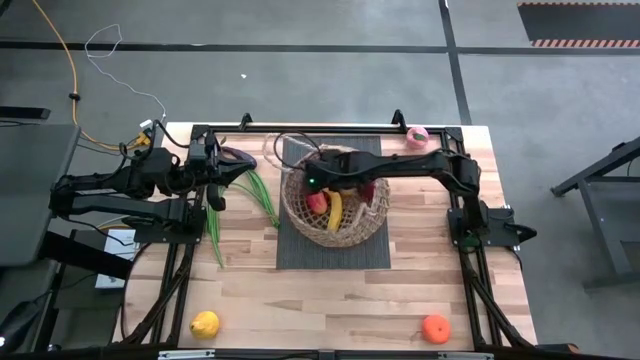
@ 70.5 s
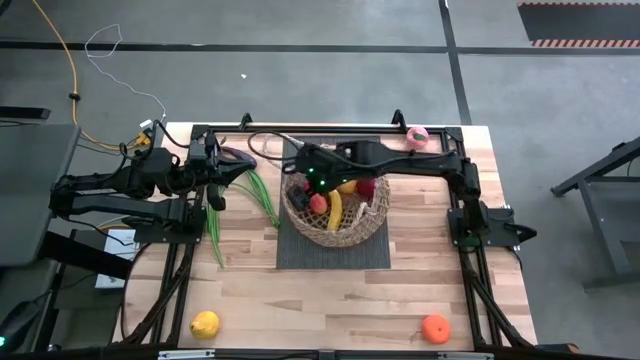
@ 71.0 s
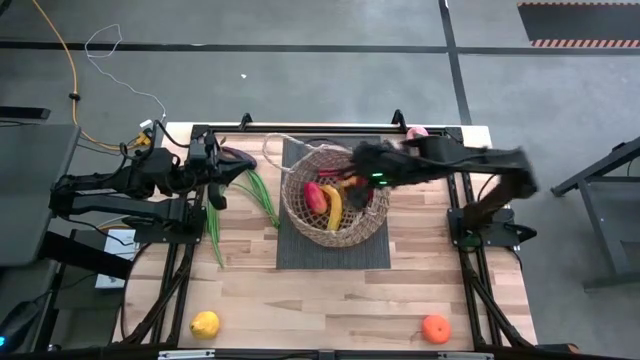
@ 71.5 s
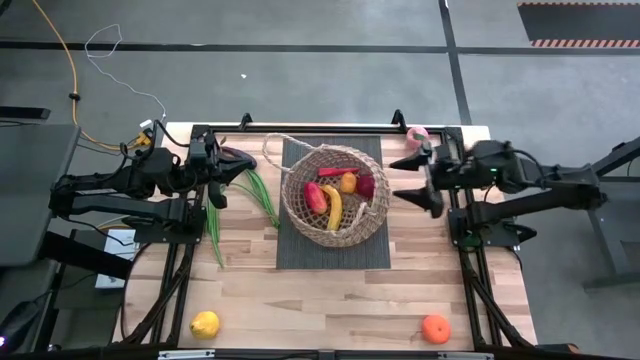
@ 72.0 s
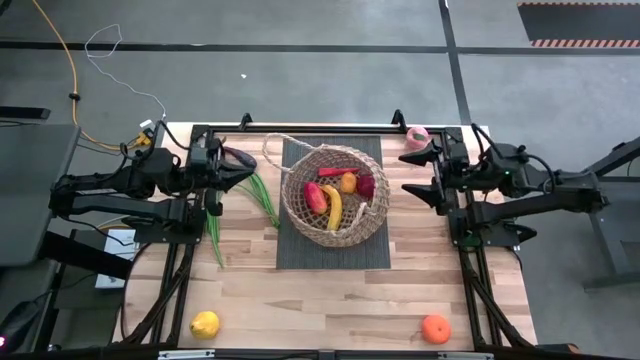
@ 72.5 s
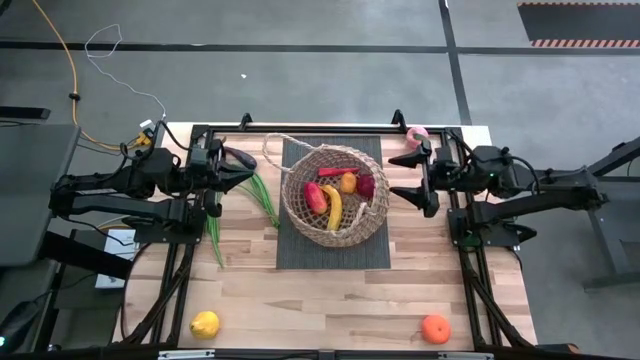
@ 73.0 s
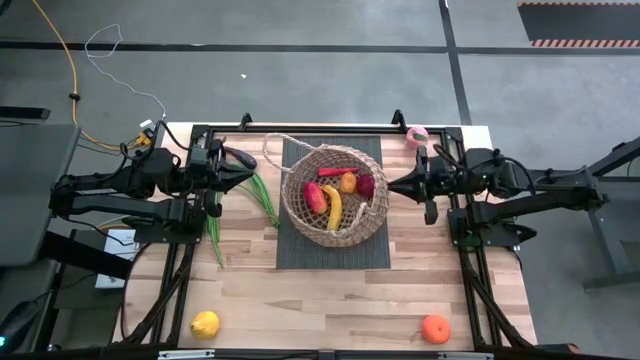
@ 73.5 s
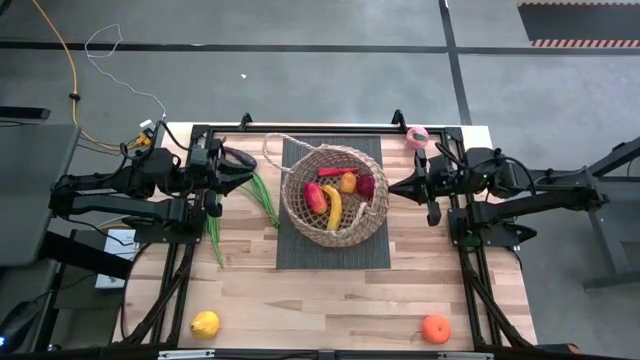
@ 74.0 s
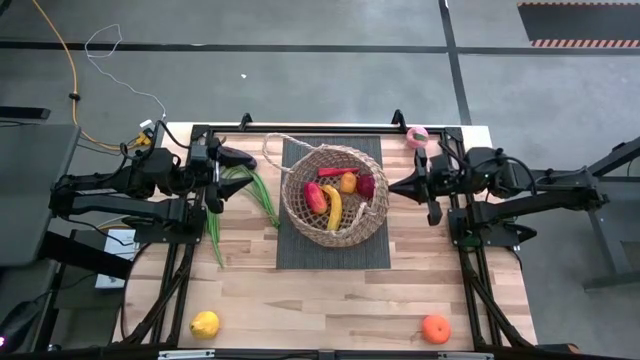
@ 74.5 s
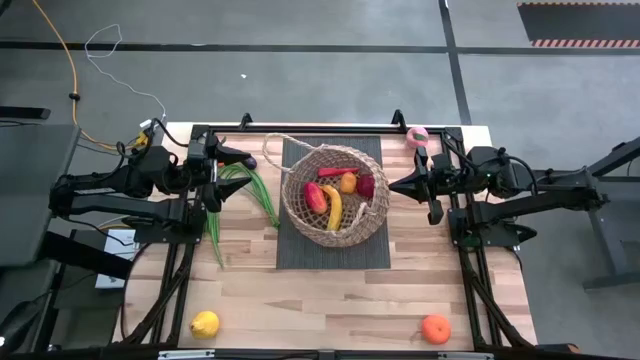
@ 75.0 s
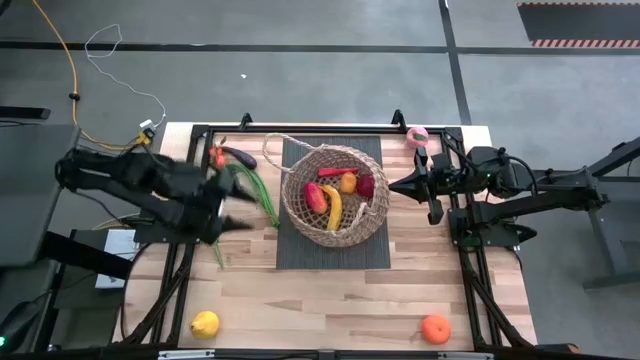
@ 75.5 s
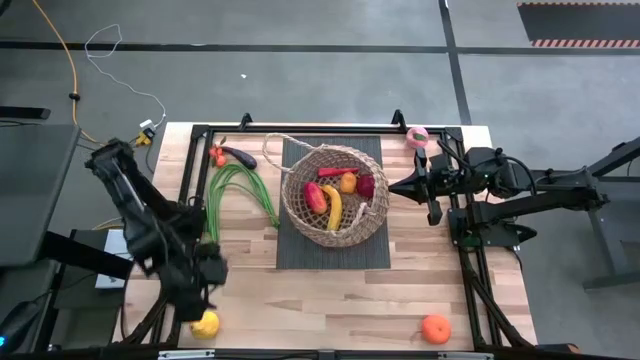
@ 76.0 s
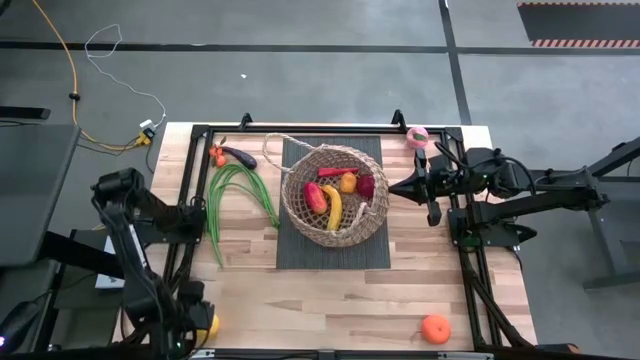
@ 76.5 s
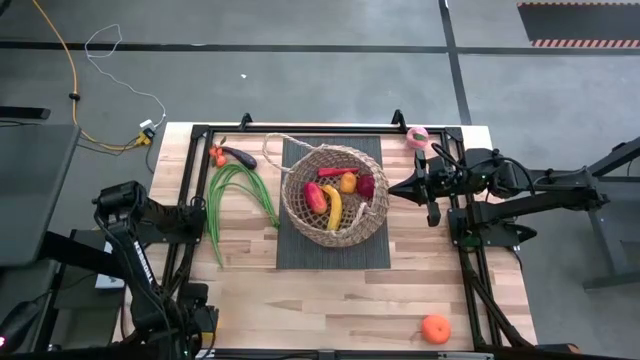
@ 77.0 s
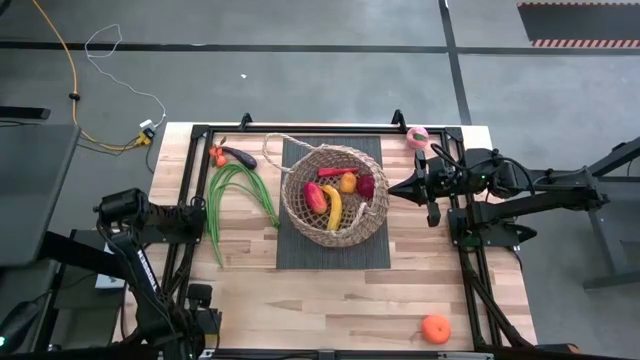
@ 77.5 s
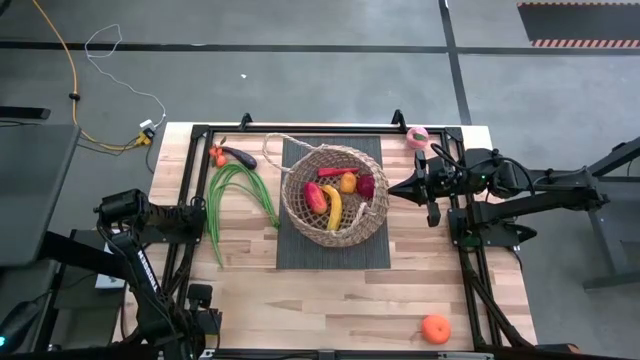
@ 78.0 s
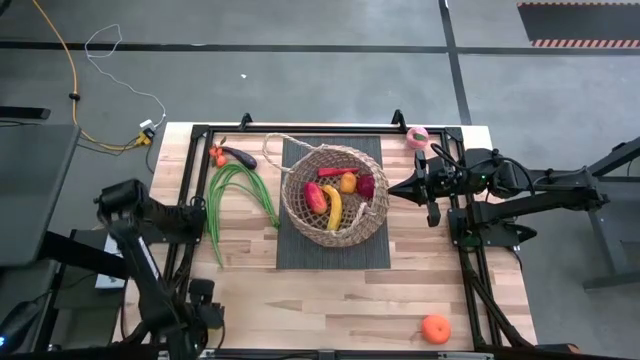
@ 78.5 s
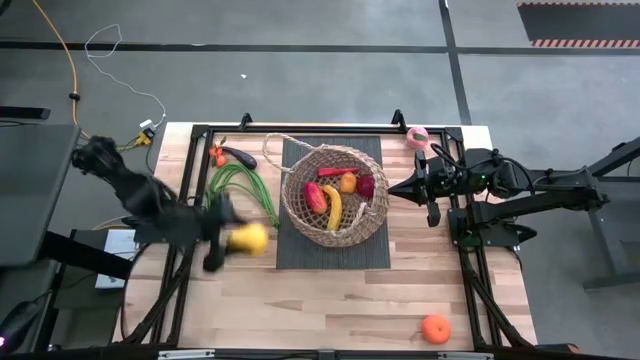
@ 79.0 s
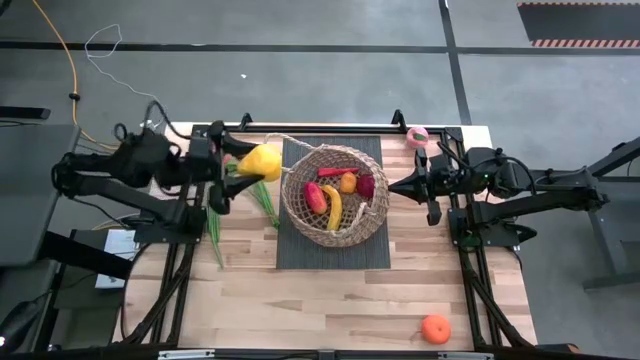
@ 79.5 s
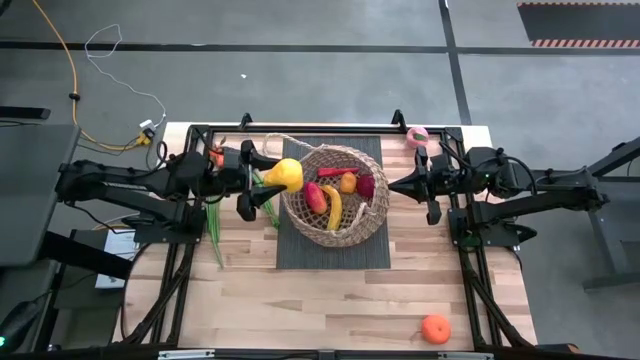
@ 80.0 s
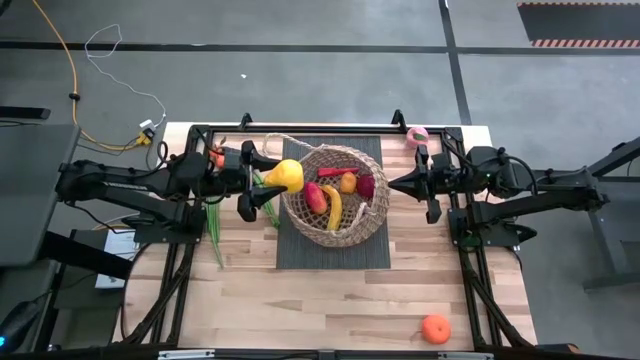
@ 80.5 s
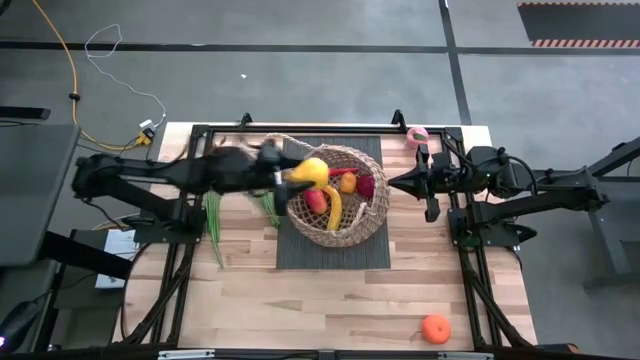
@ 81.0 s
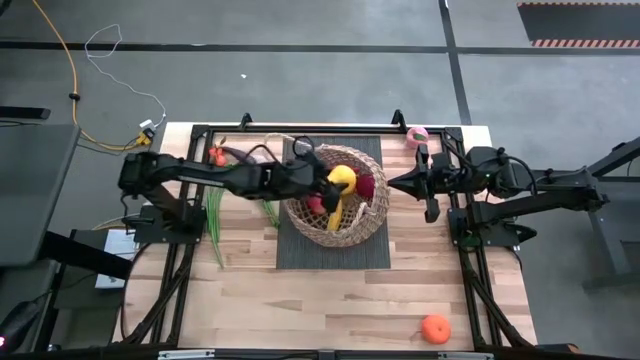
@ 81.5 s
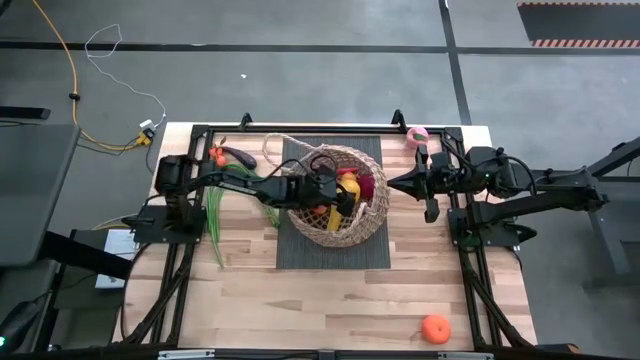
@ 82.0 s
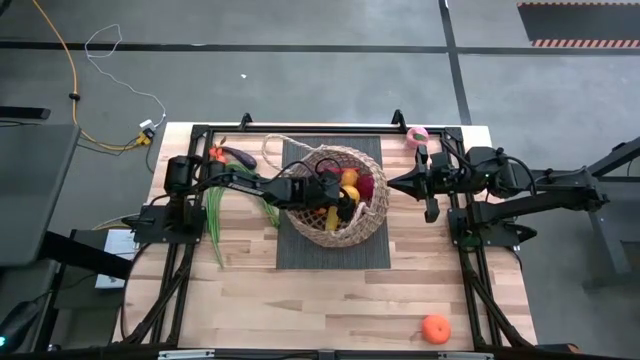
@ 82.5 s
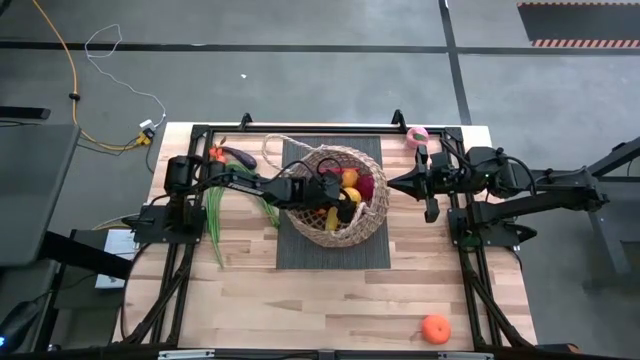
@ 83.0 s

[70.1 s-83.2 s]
Task: Build produce basket
Put the pear into the woven basket

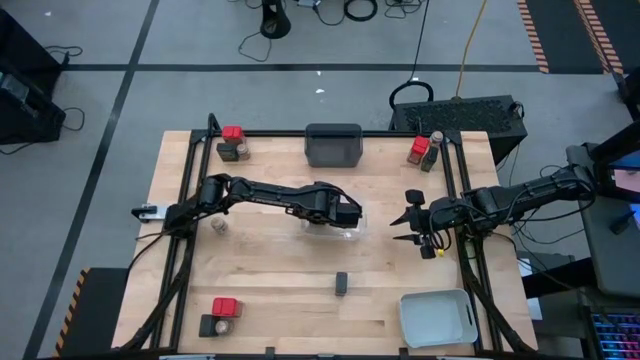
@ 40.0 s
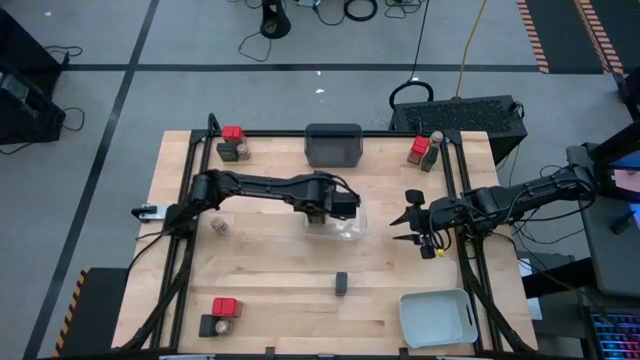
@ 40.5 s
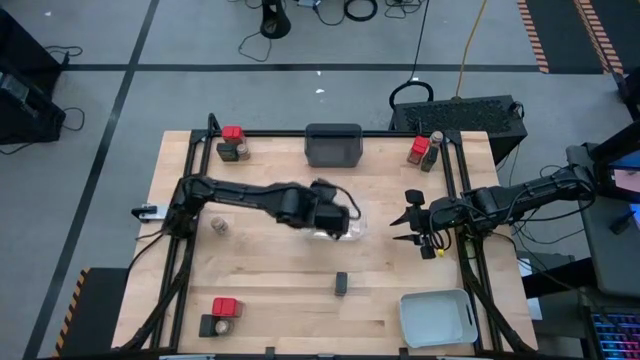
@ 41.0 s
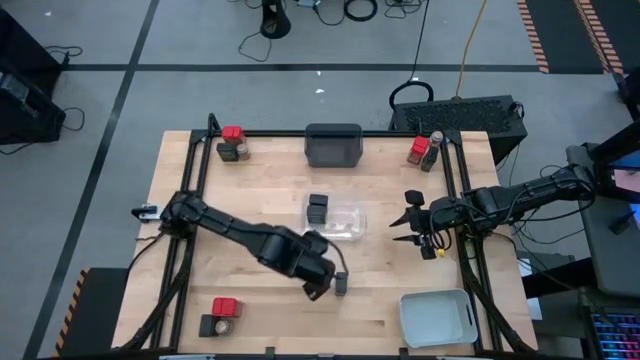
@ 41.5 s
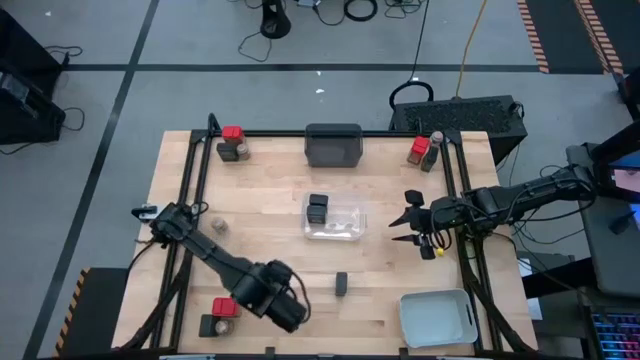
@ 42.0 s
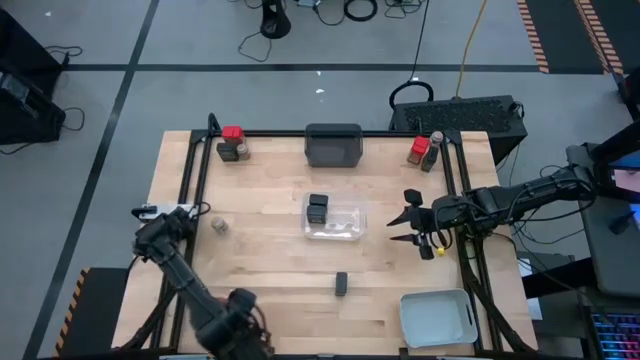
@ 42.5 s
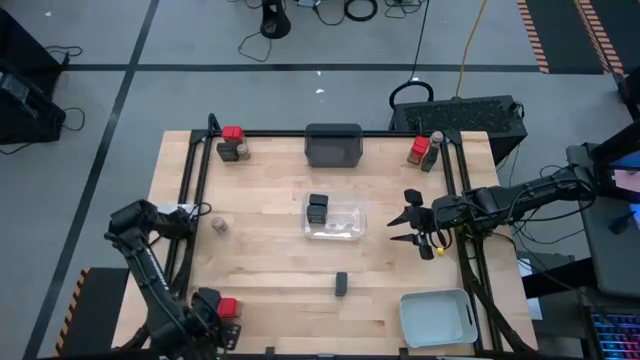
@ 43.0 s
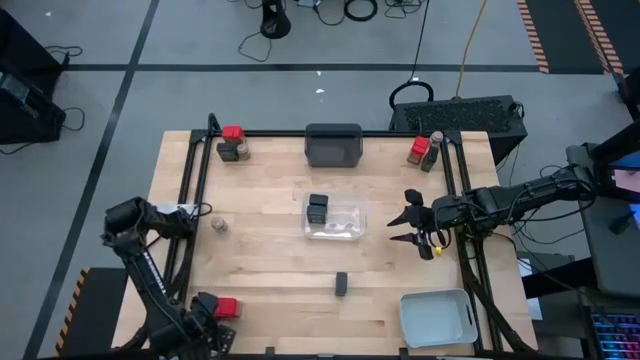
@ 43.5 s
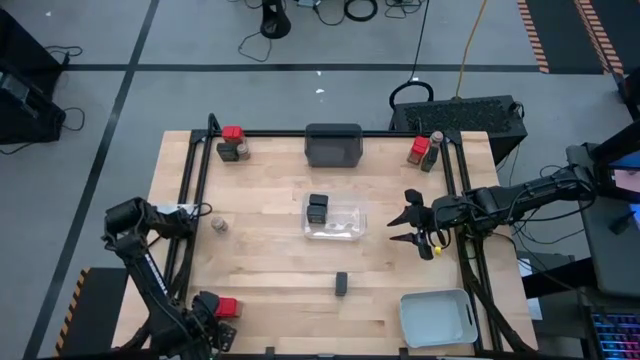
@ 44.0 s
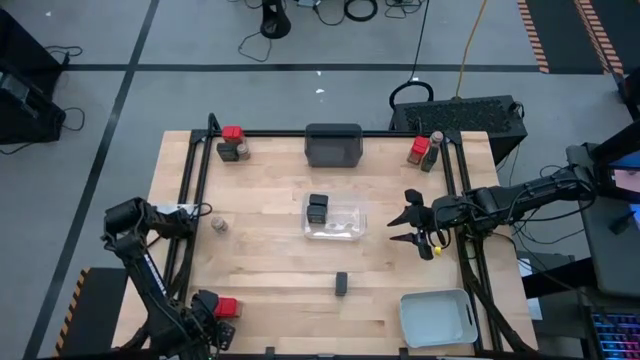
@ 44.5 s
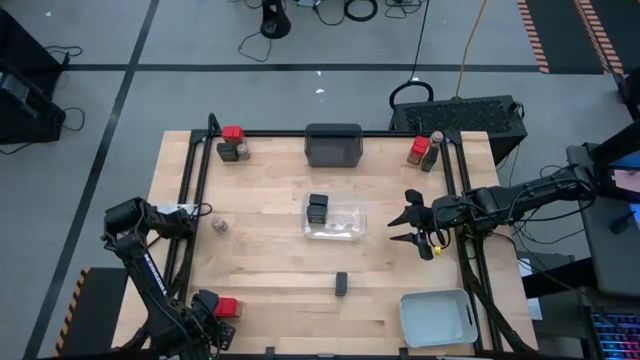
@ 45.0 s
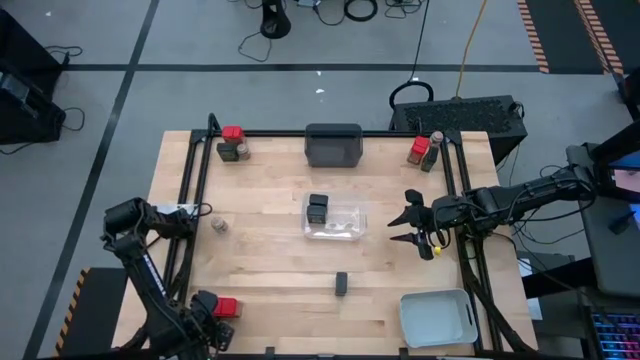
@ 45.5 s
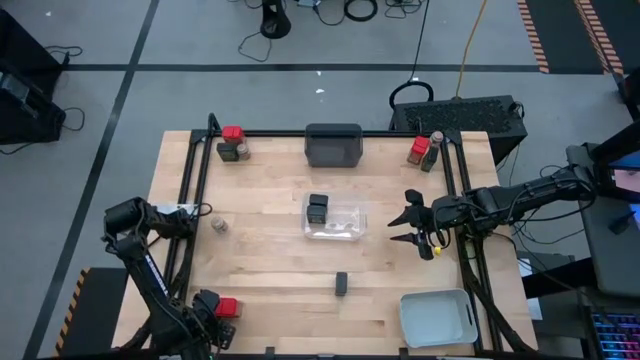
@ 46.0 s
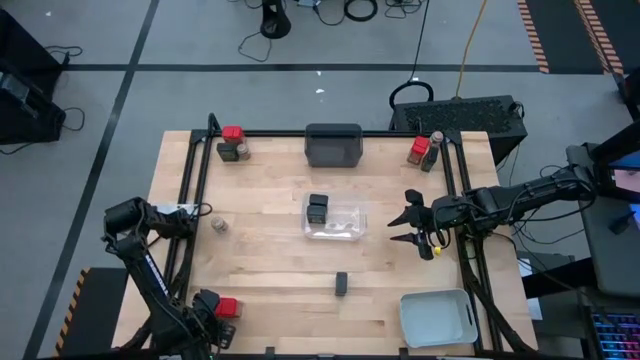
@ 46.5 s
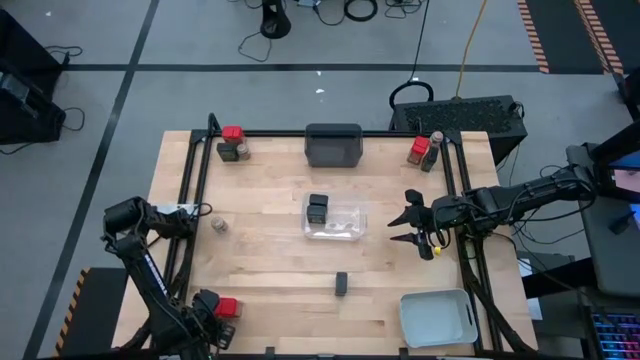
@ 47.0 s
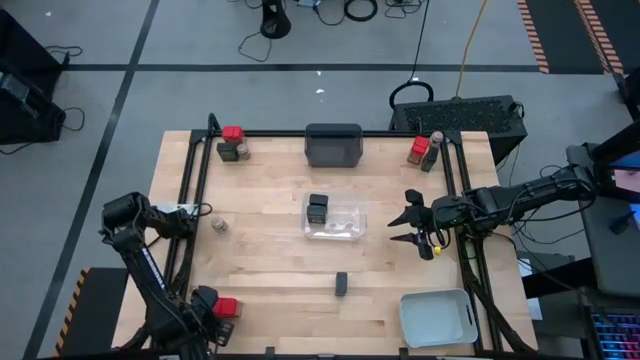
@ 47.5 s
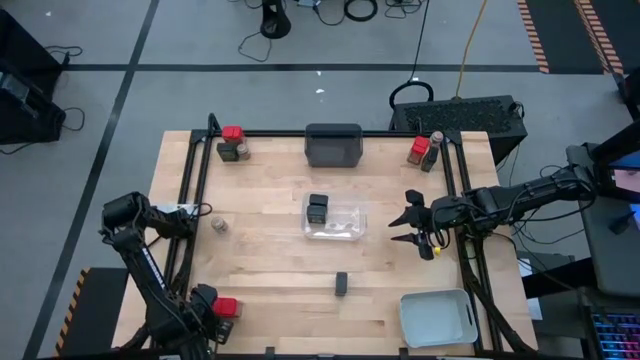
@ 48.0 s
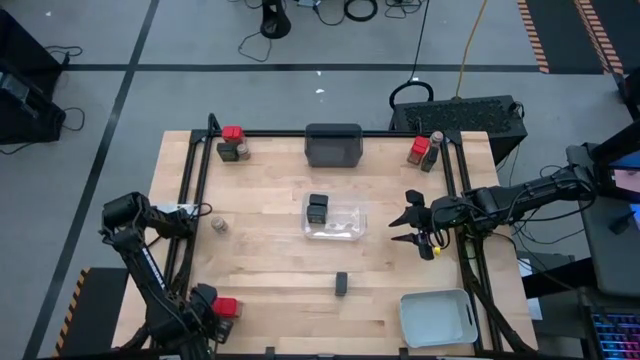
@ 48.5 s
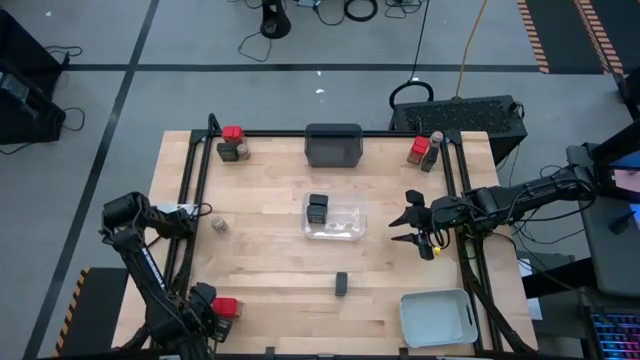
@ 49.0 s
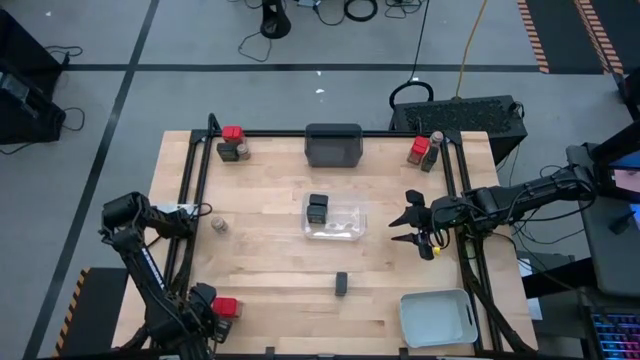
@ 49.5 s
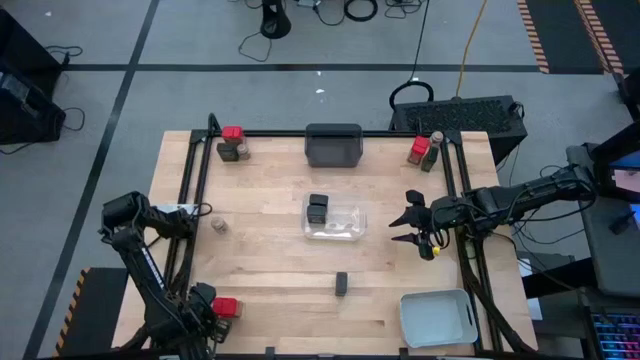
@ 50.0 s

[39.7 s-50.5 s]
Task: Sort spices by type
Put the green seasoning bottle into the transparent bin
